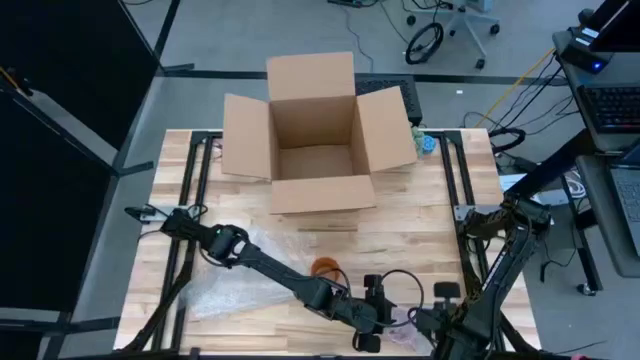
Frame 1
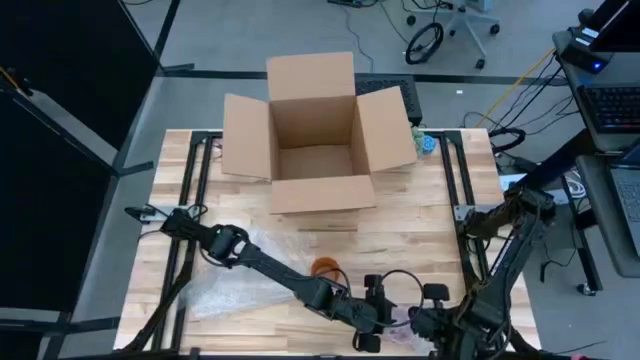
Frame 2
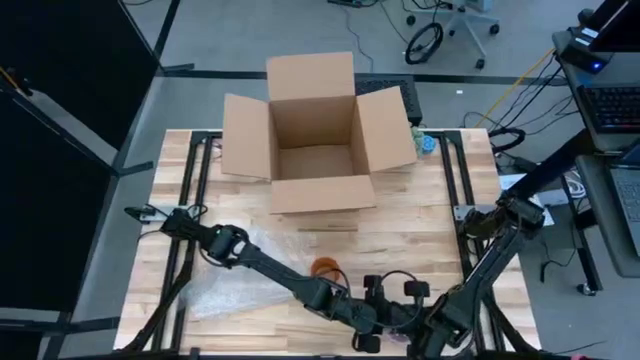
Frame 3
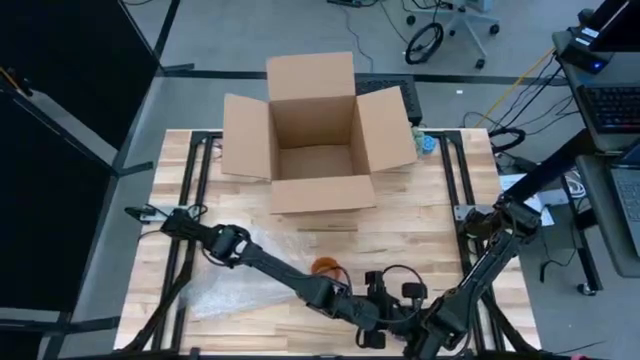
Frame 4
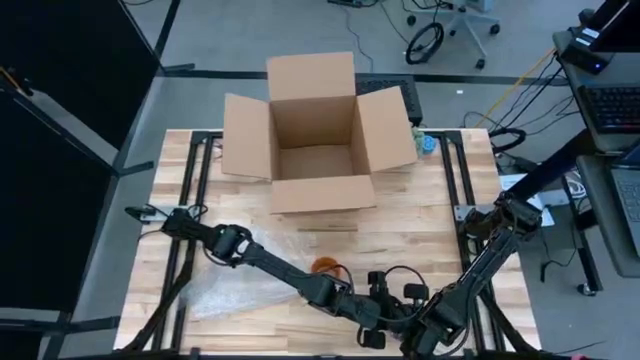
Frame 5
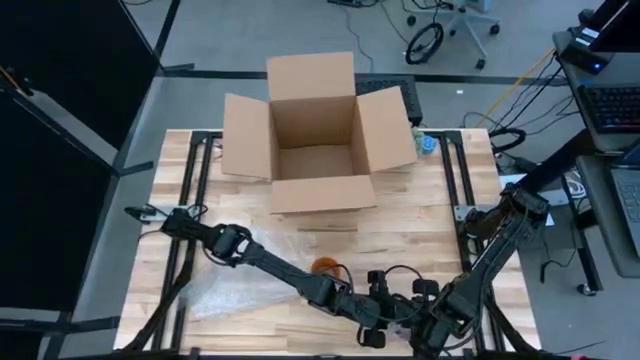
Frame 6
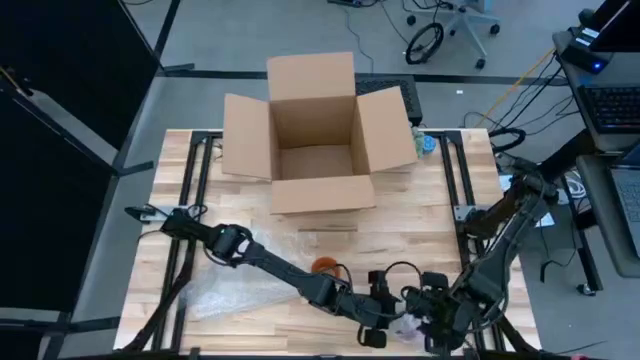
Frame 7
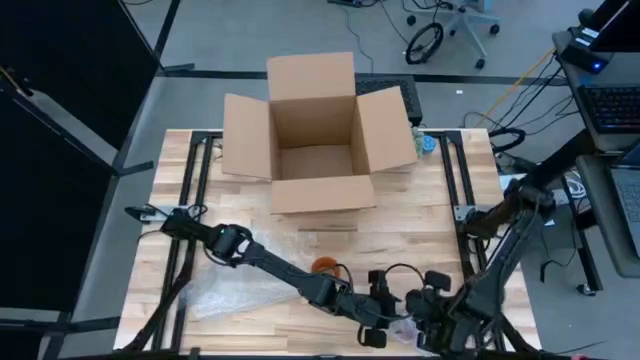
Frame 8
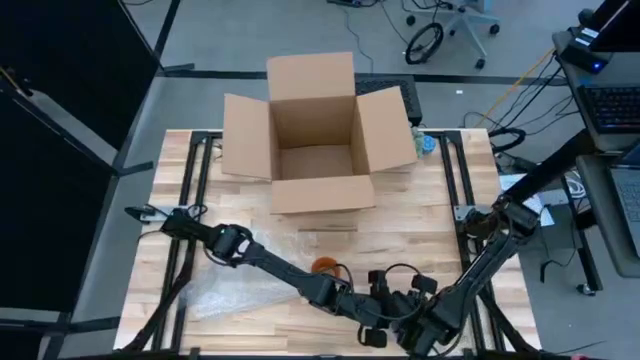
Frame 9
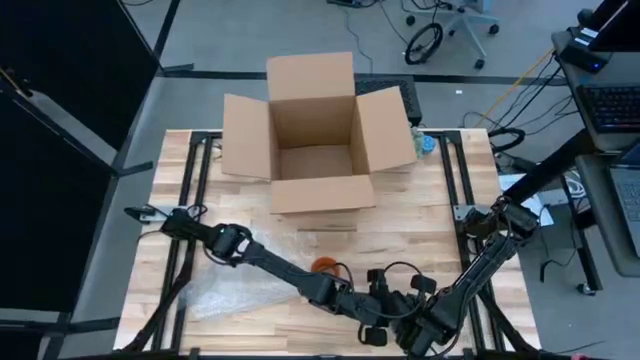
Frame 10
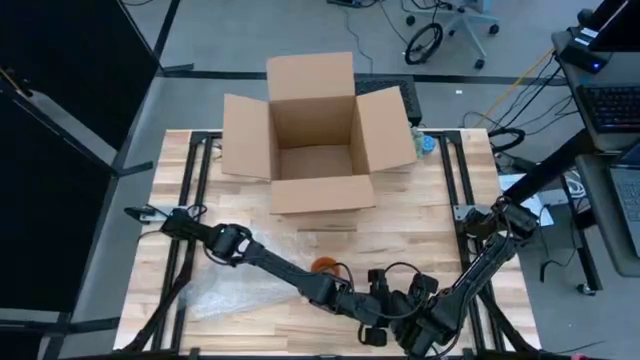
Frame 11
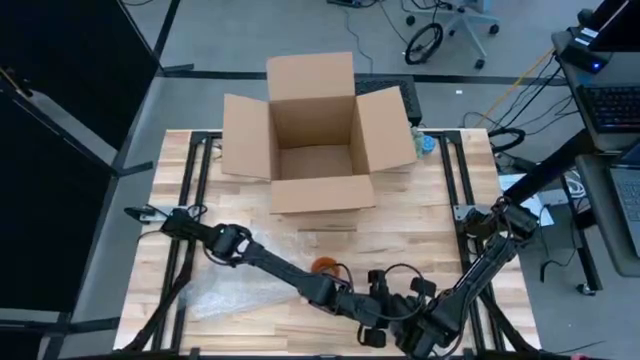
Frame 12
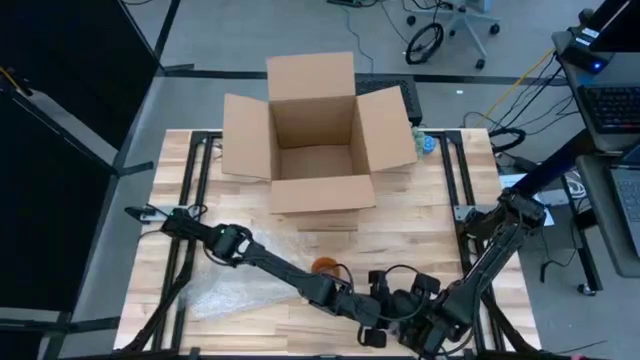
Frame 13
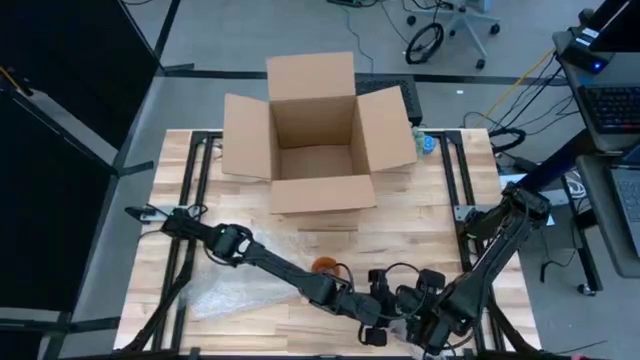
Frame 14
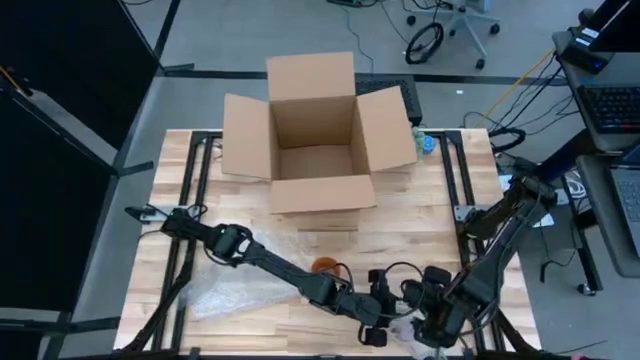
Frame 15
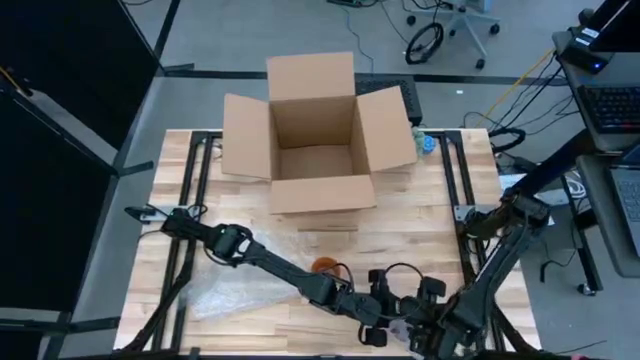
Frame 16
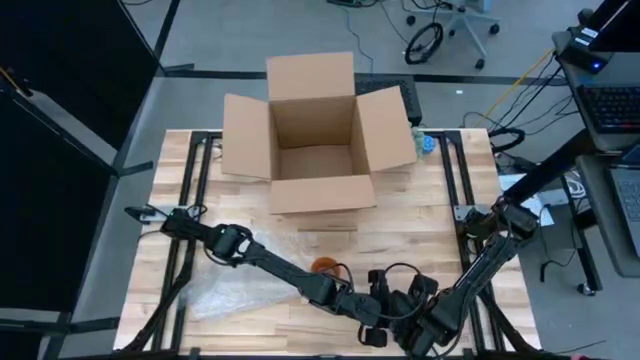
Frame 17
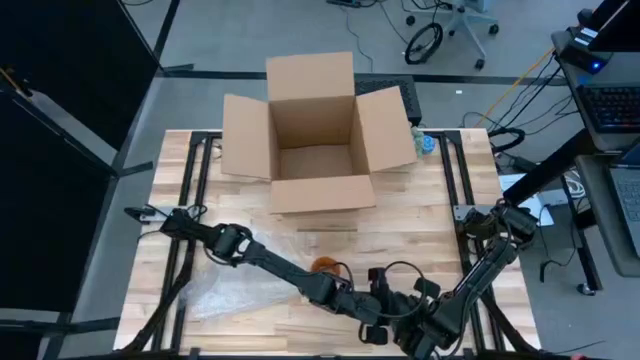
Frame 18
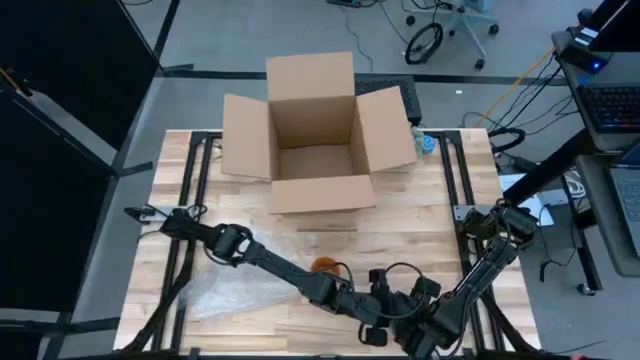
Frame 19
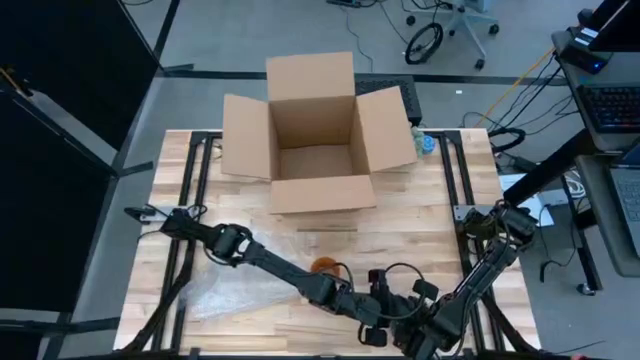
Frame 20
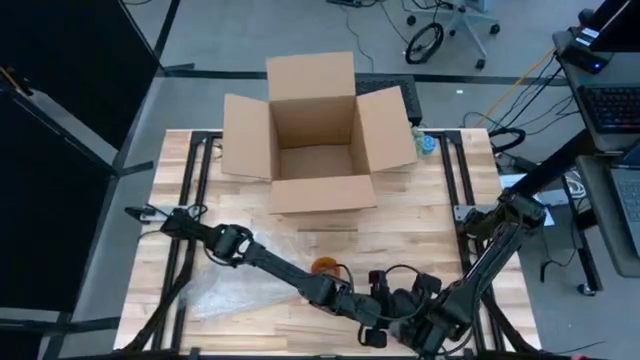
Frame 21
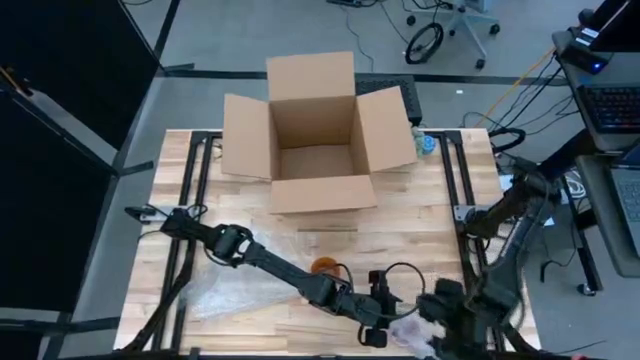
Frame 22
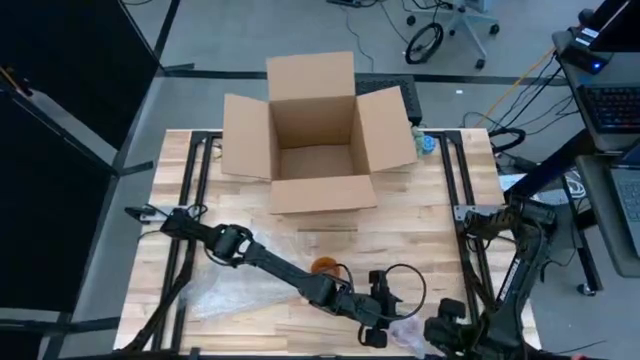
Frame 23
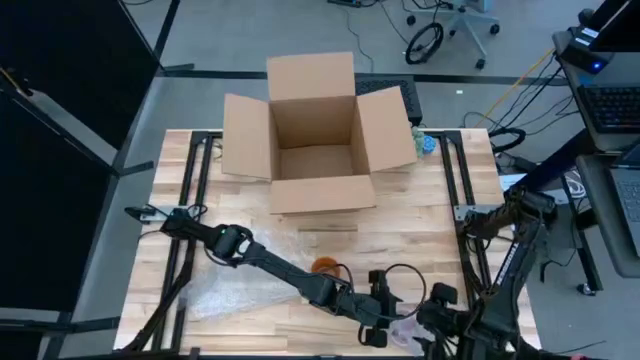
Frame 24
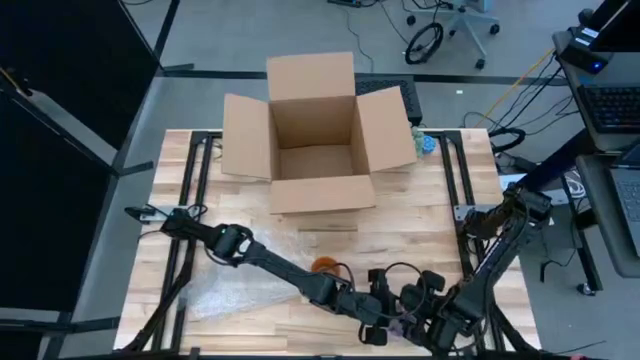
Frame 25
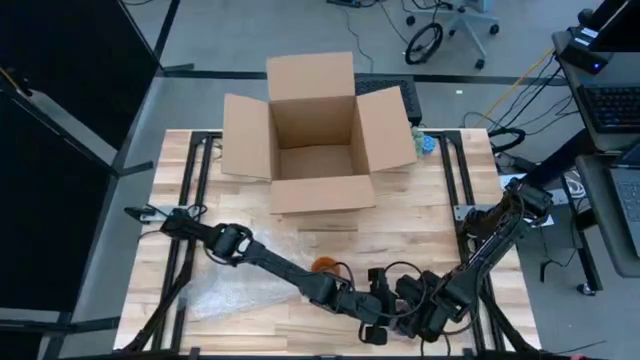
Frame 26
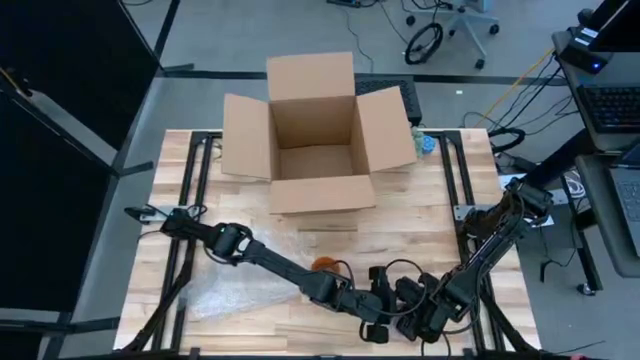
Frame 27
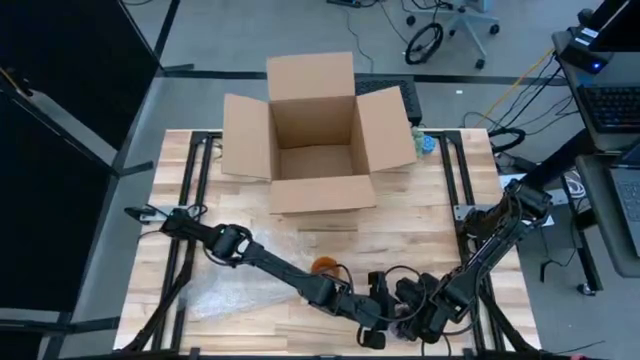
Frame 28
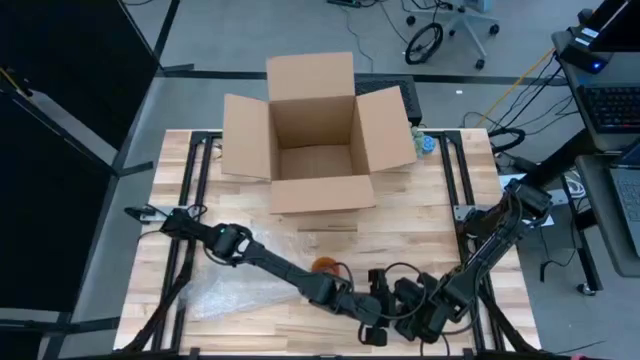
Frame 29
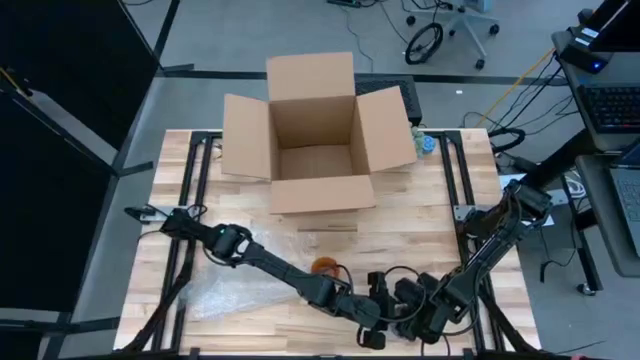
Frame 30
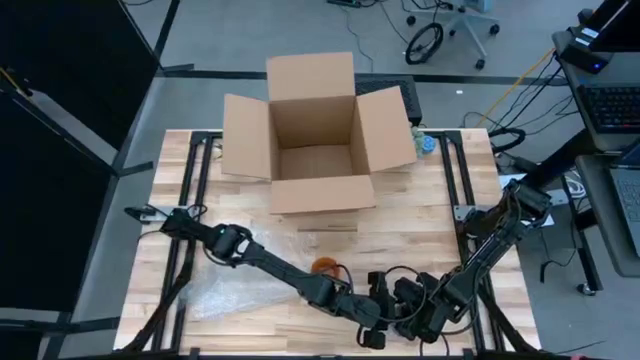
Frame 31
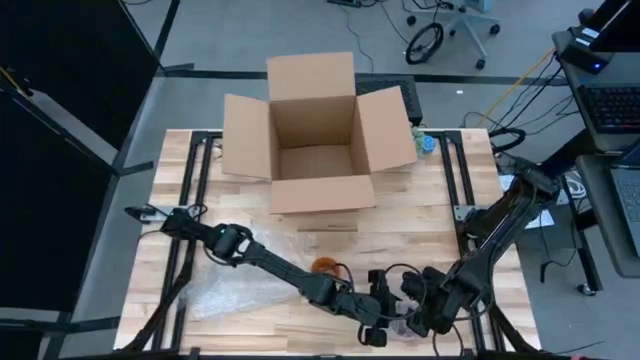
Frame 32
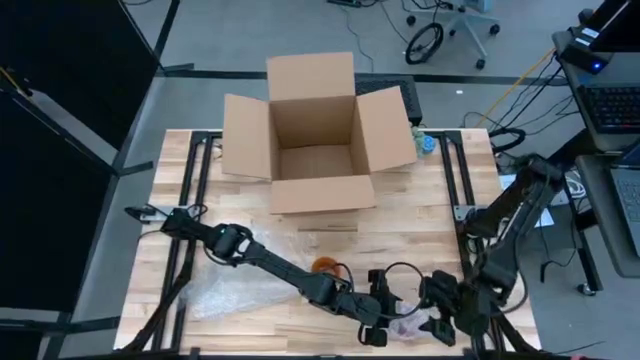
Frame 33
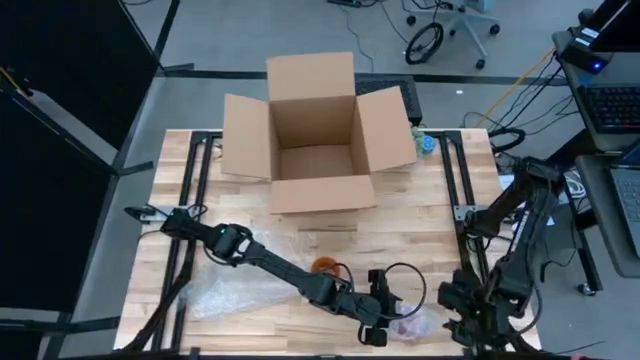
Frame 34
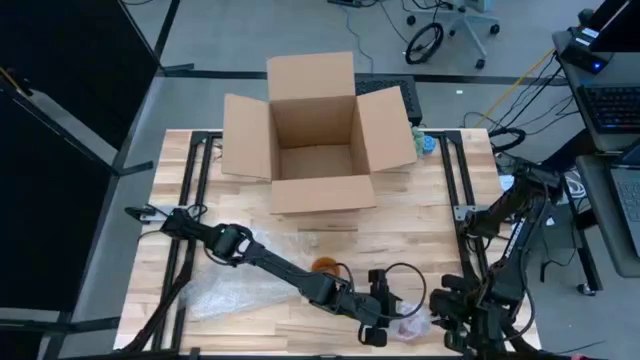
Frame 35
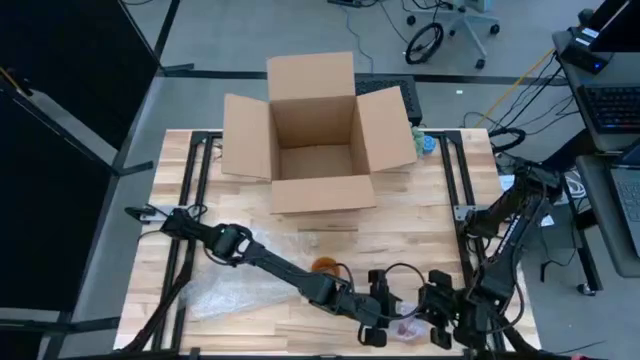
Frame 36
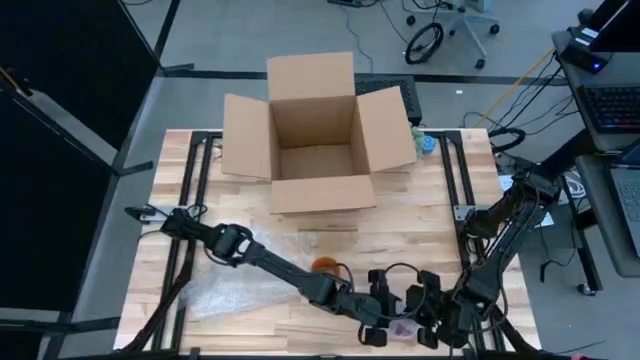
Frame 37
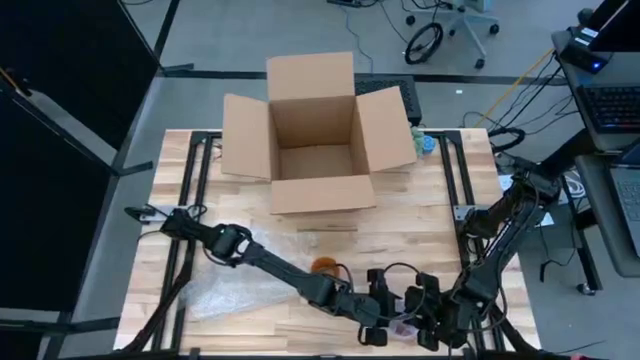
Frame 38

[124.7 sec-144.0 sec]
Task: wrap mug
Wrap the pink mug with the transparent bubble wrap
